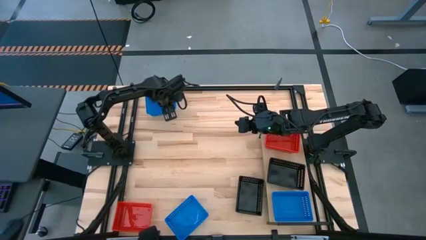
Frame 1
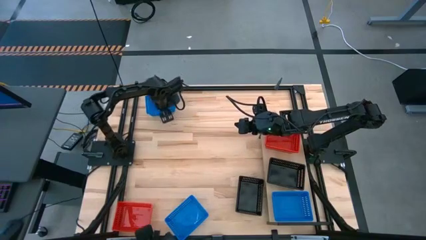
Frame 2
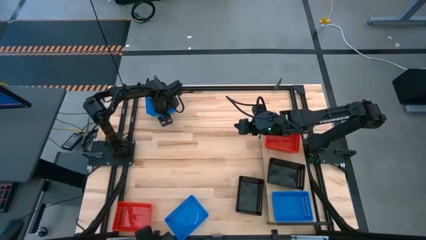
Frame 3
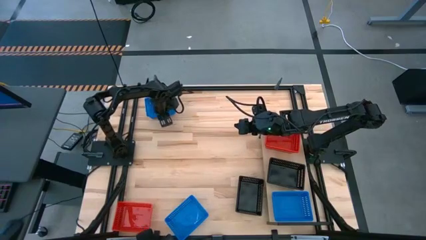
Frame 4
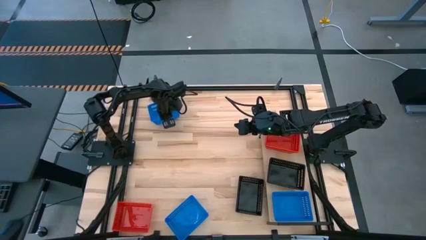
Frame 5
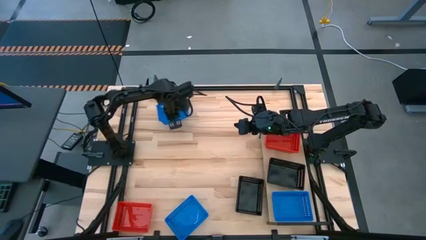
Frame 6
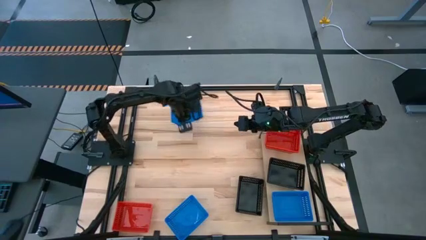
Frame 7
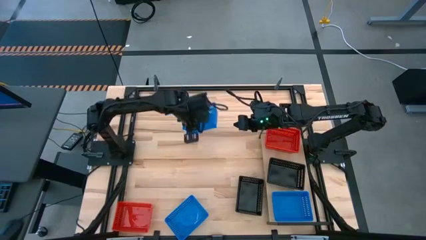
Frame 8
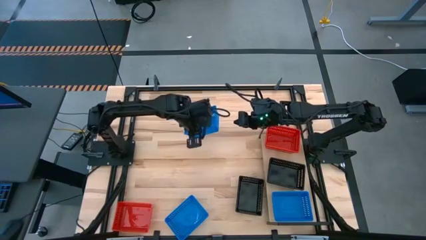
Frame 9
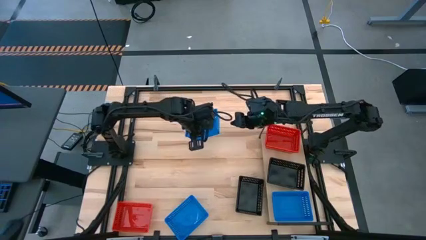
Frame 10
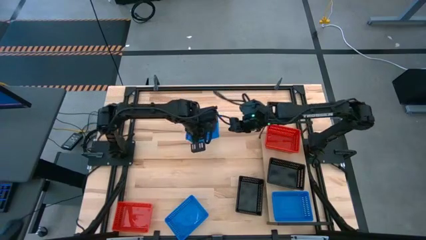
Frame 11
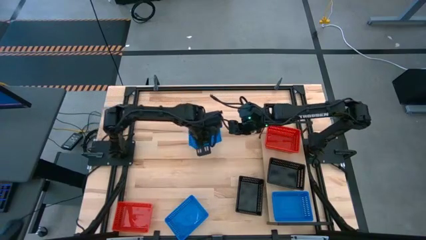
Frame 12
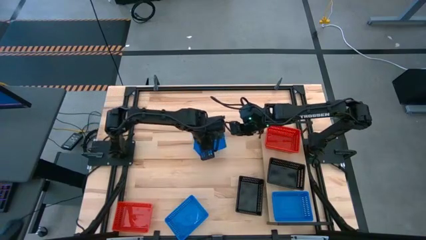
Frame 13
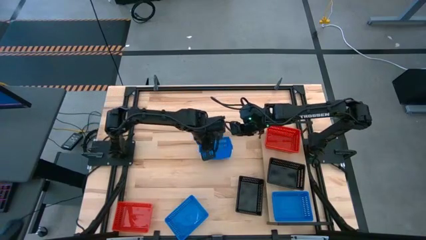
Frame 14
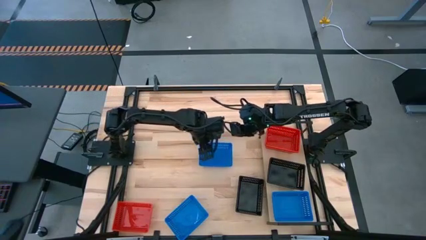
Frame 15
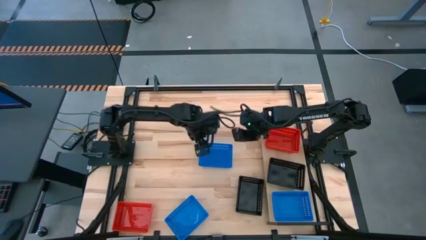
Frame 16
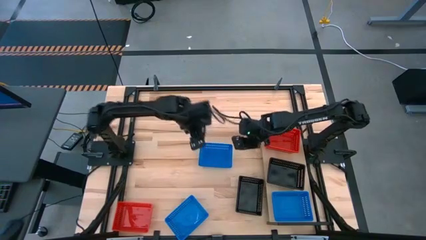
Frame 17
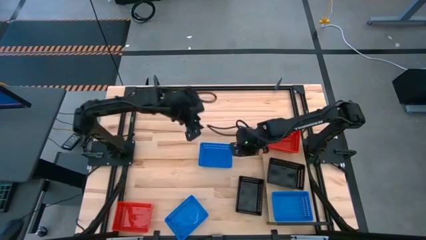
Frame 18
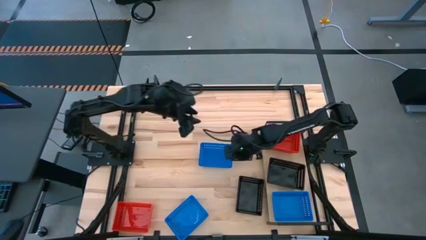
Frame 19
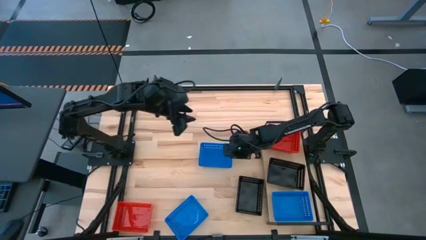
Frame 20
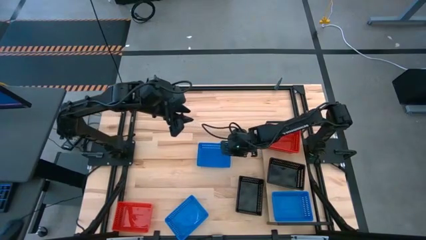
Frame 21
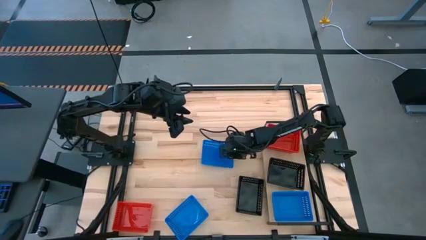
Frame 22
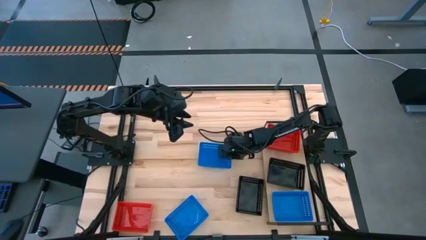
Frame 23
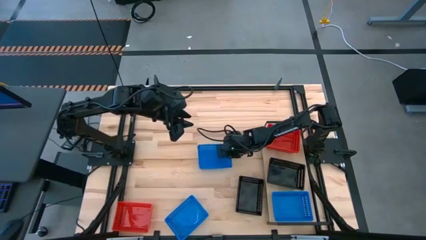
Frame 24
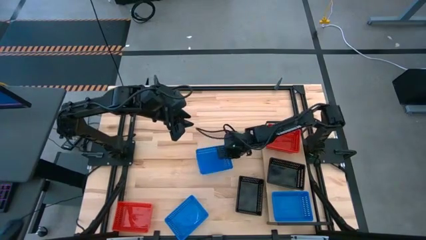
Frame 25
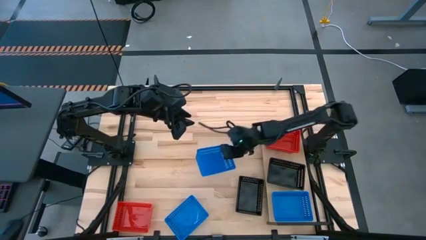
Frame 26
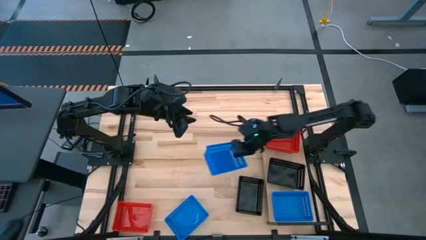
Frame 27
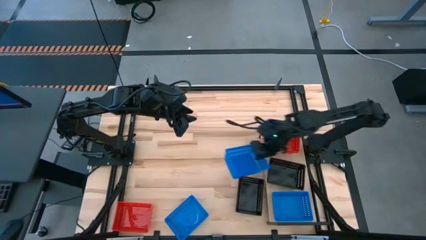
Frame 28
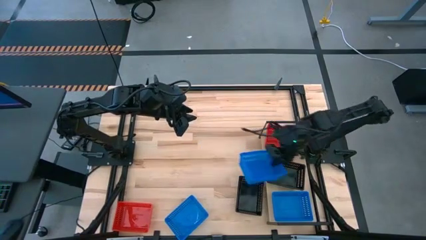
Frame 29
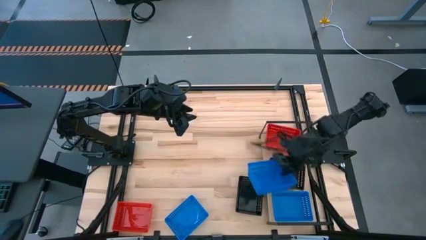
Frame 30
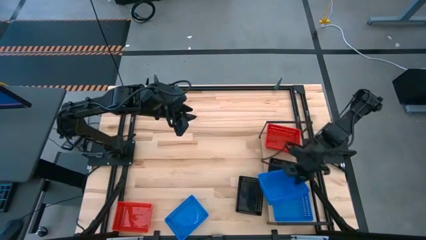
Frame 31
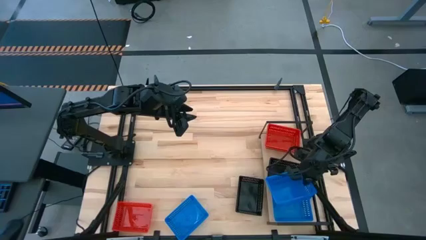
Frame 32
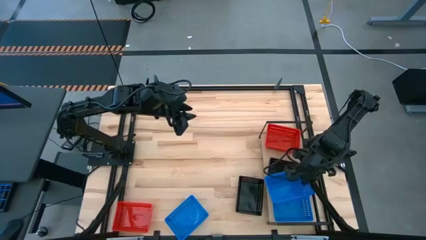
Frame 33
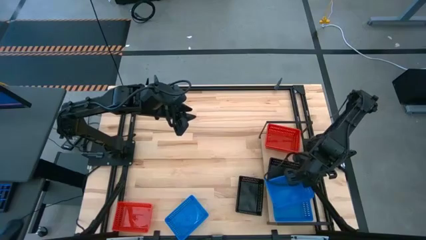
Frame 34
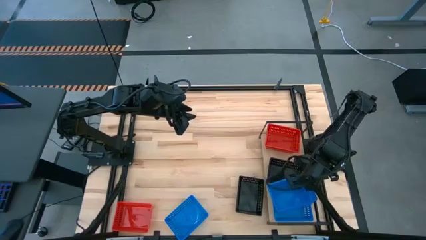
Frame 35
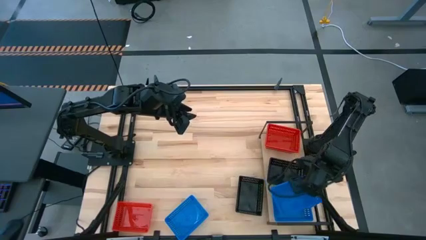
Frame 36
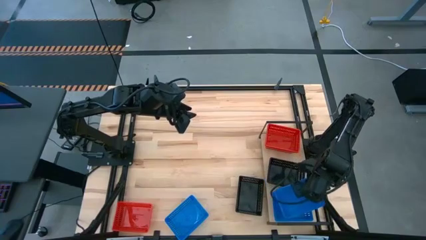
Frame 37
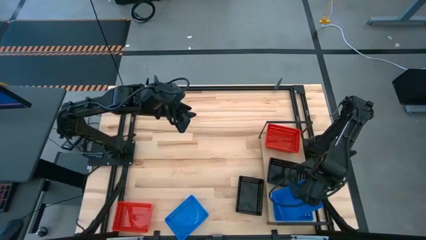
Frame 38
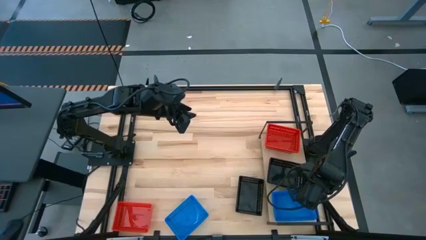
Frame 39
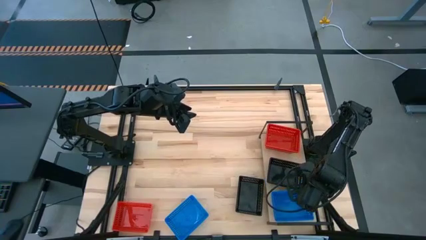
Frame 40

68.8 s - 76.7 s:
Task: Stack baskets on shelf by color
Stack the top blue bin on top of the blue bin on the shelf

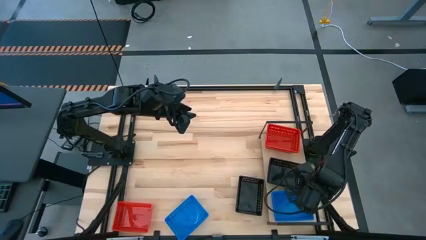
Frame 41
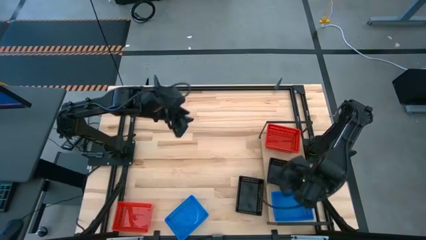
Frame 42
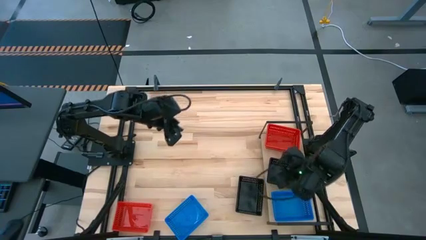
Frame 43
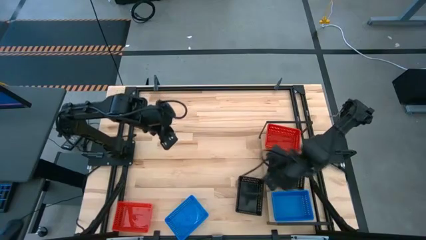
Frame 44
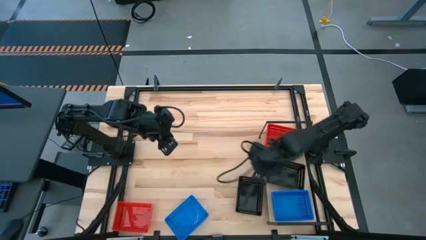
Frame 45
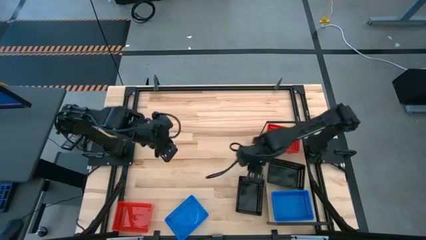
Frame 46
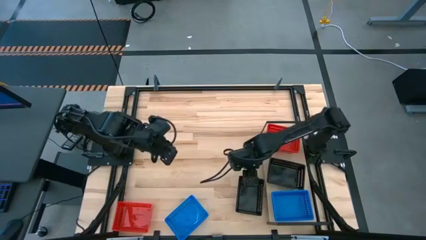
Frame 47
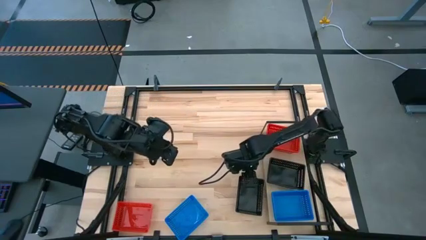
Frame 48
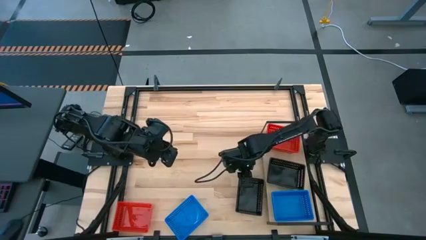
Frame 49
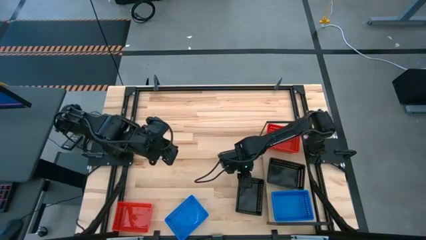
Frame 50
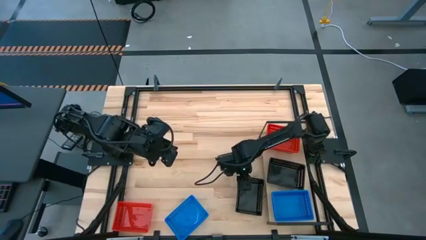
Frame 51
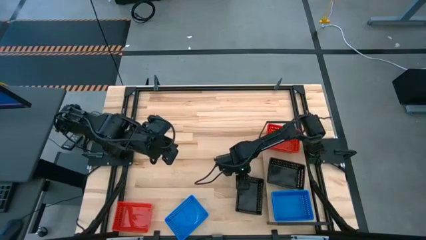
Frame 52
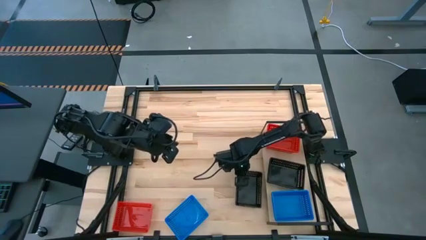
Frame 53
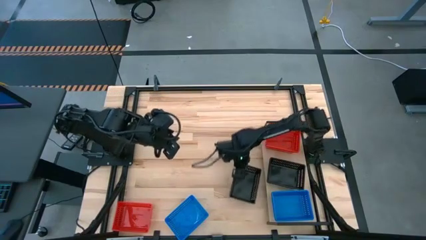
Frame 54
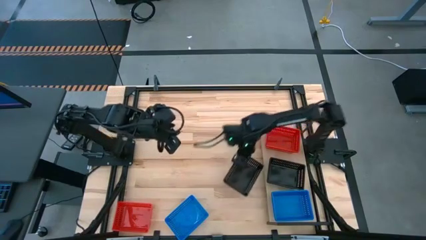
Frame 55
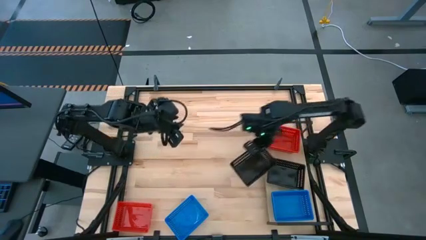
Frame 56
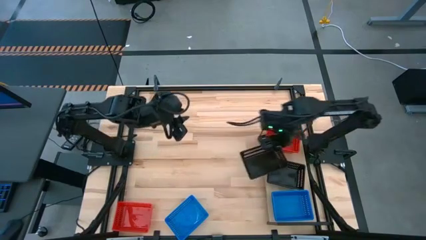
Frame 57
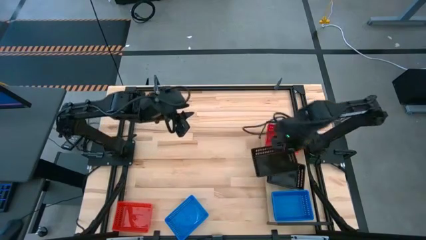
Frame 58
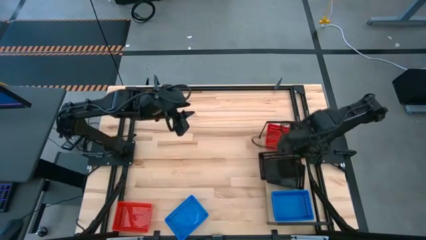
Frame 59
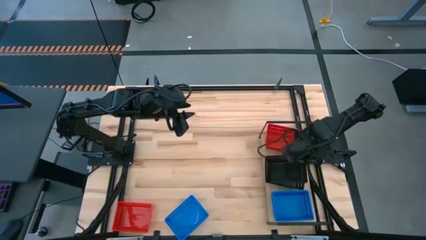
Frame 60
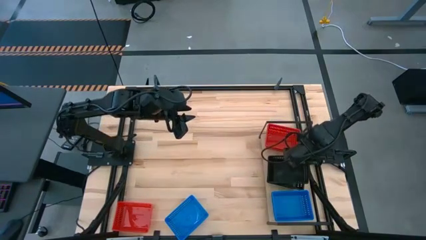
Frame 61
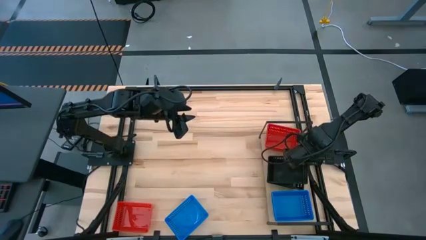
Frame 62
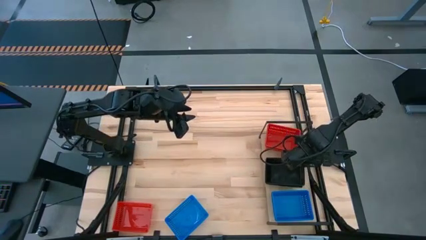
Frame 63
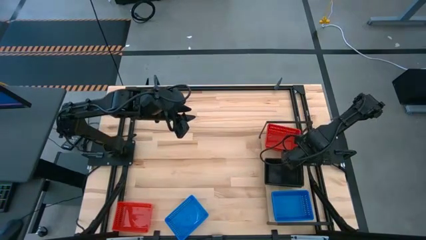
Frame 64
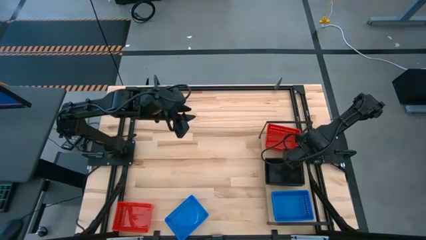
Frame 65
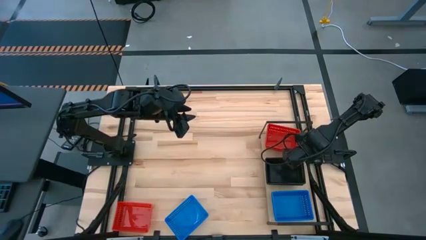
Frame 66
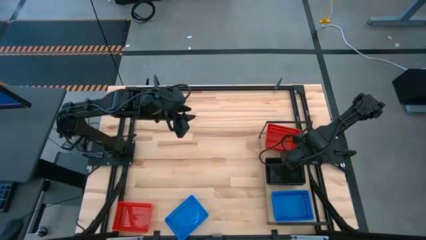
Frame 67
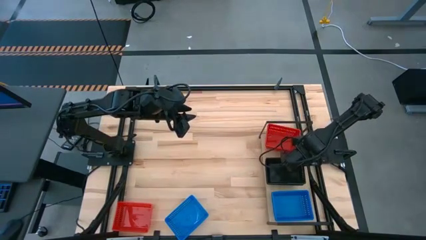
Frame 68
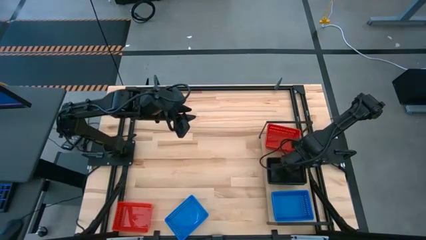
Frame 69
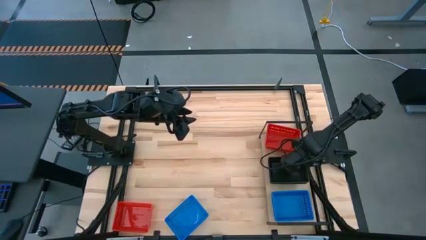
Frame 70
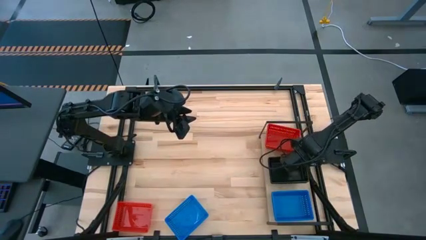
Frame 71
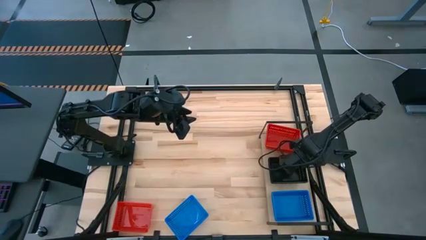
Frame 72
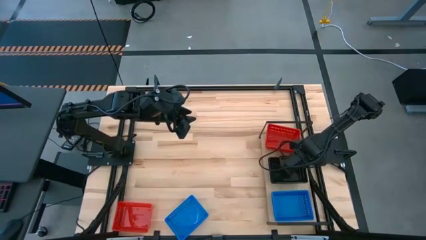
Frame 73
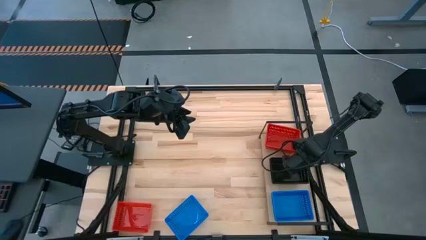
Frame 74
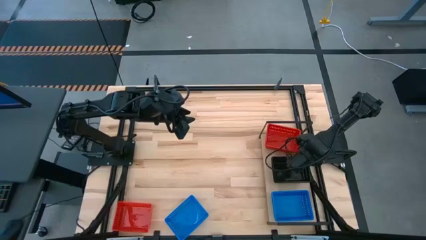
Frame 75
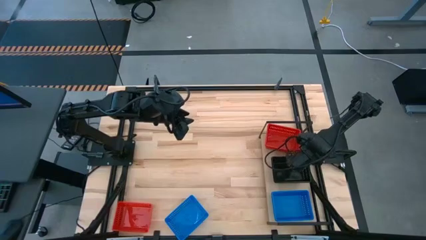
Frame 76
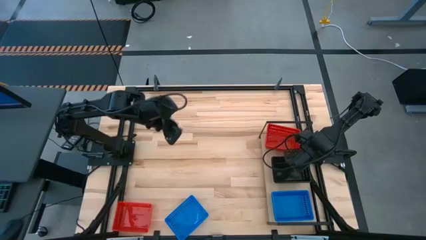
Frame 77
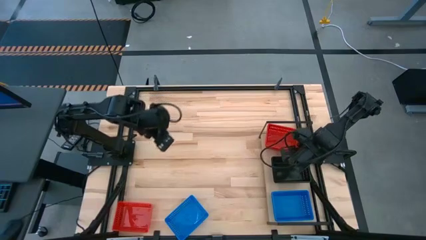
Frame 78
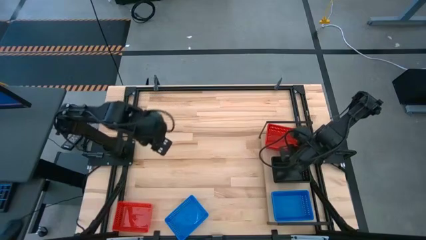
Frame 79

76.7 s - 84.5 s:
Stack the black bin on top of the black bin on the shelf

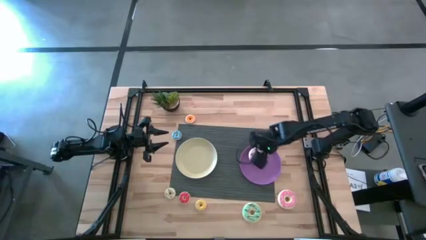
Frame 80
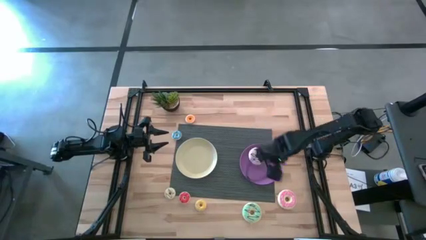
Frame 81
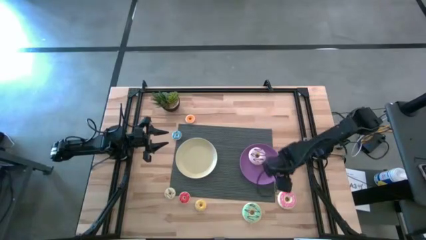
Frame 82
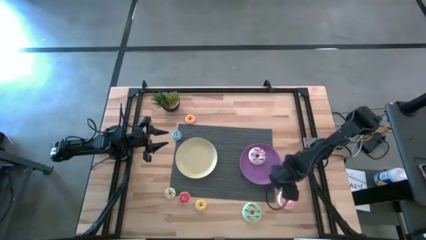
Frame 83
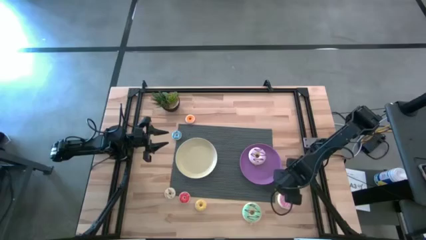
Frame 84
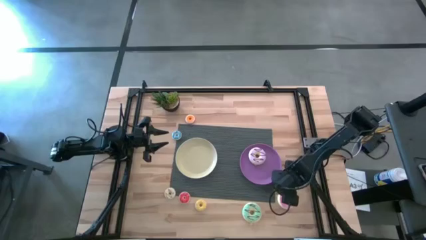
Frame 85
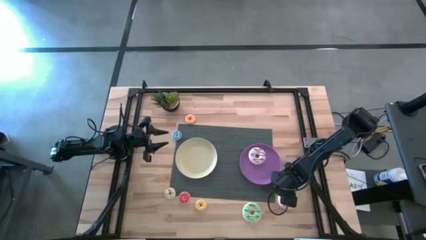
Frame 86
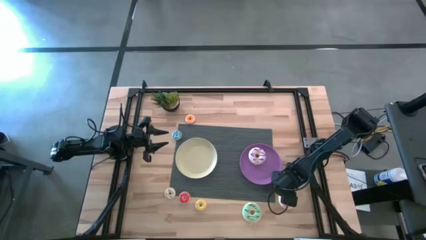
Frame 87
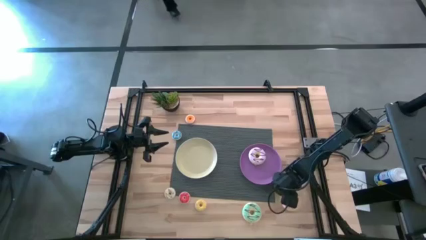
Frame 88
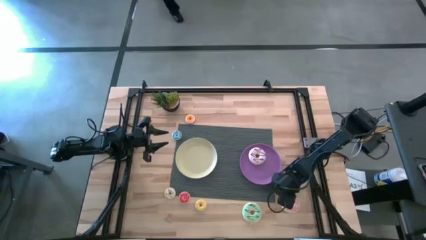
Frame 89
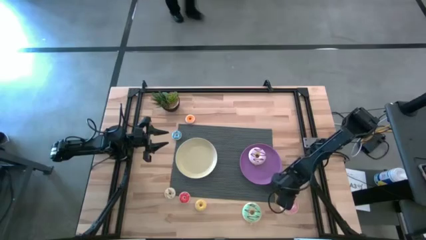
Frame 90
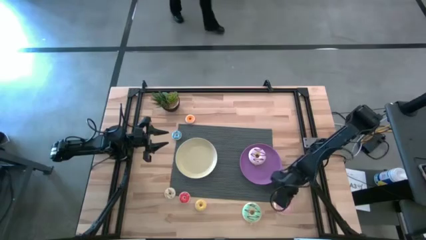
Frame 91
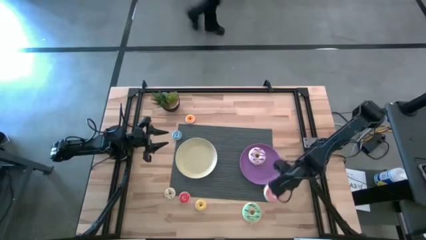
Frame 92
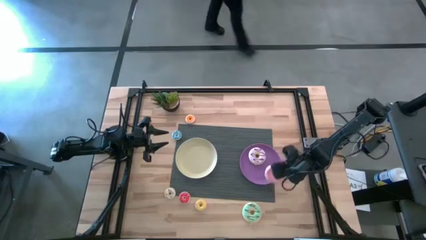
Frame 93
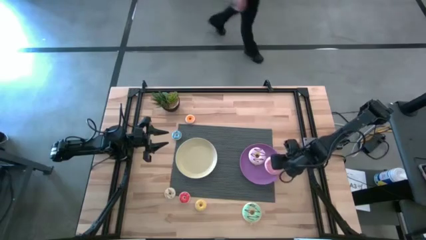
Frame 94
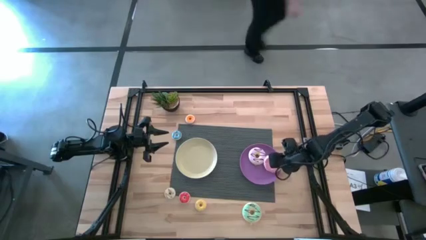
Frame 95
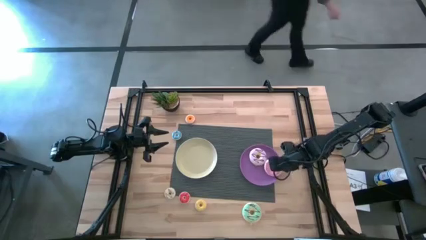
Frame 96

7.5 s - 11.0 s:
Task: Pick & Place donuts
Put the large pink donut on the purple plate
